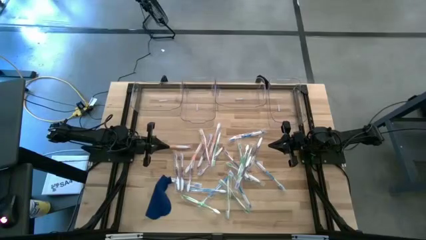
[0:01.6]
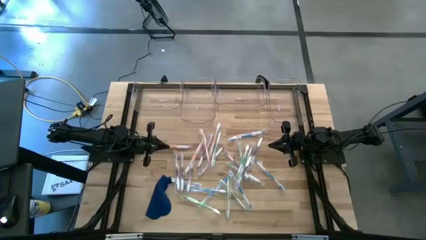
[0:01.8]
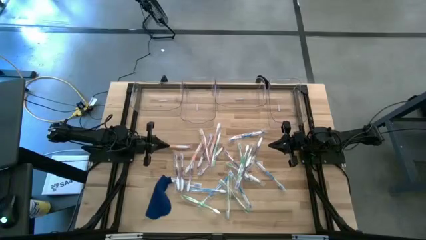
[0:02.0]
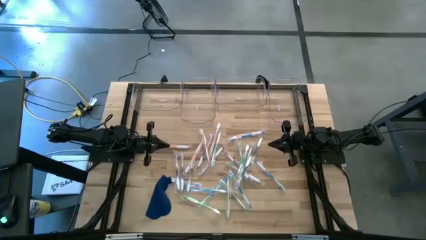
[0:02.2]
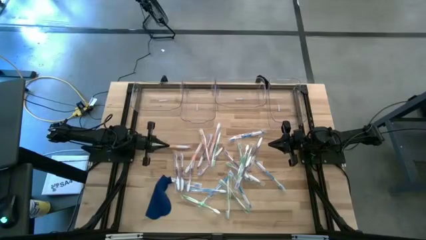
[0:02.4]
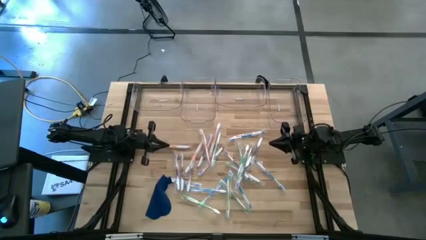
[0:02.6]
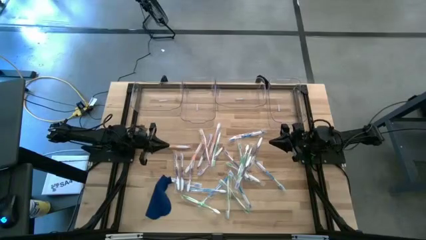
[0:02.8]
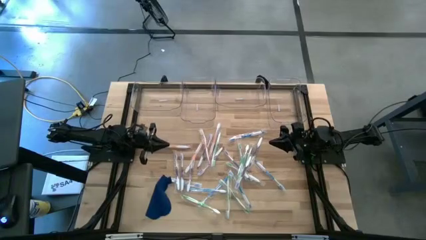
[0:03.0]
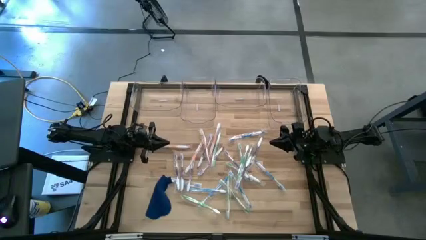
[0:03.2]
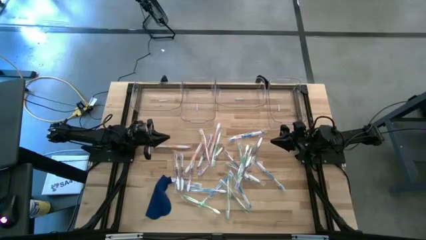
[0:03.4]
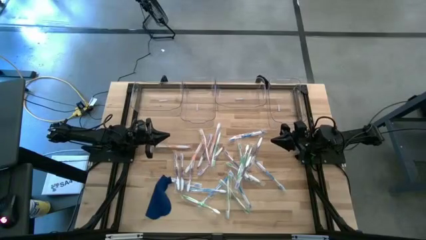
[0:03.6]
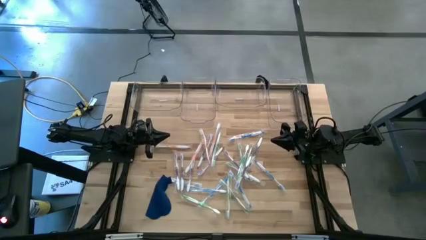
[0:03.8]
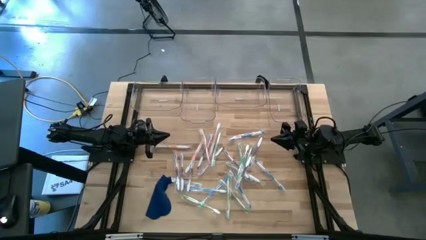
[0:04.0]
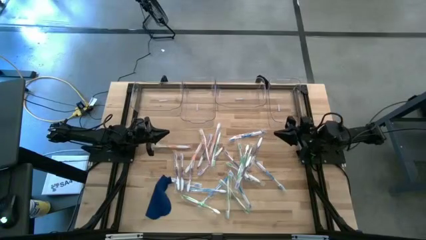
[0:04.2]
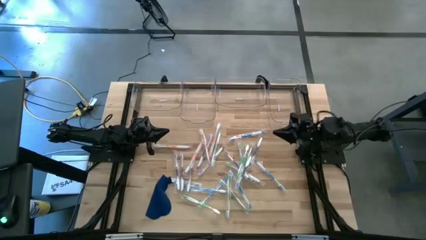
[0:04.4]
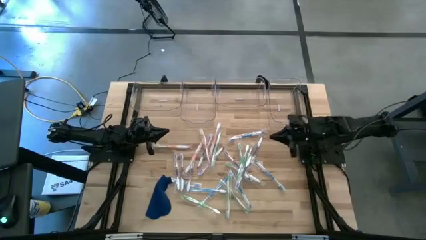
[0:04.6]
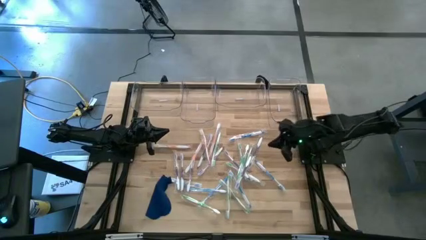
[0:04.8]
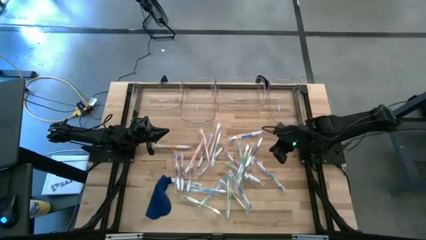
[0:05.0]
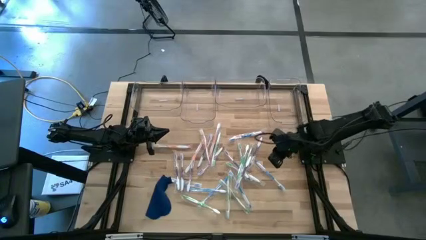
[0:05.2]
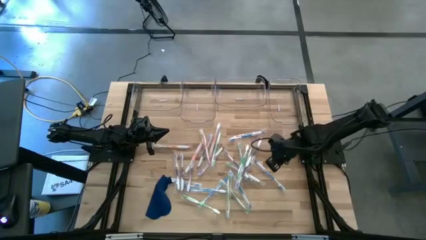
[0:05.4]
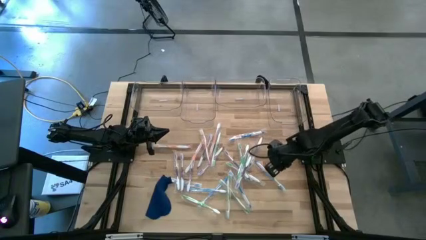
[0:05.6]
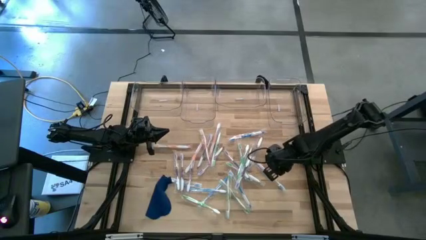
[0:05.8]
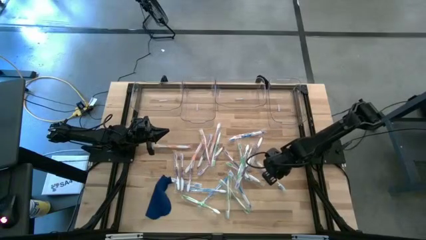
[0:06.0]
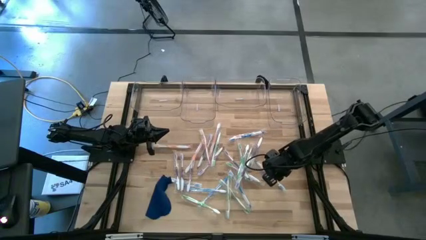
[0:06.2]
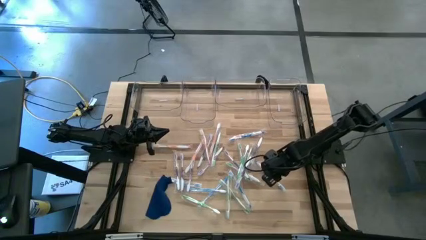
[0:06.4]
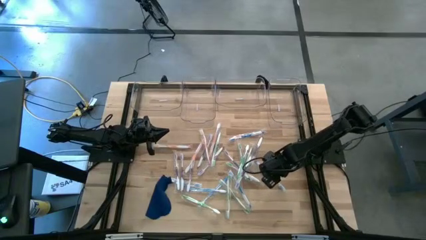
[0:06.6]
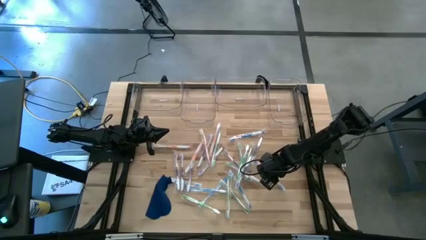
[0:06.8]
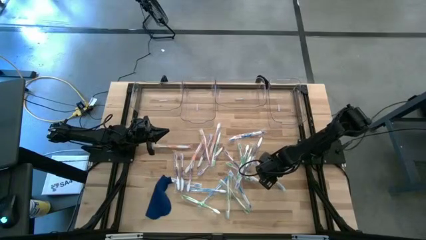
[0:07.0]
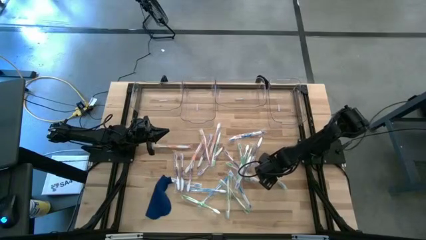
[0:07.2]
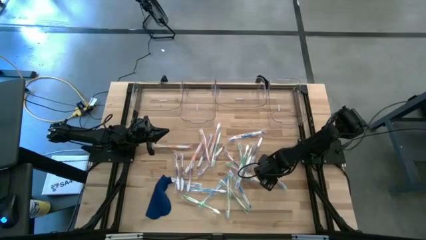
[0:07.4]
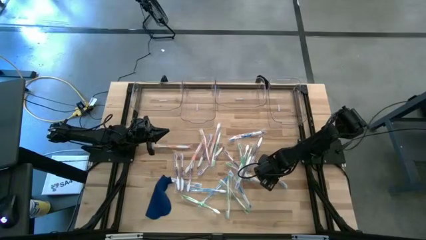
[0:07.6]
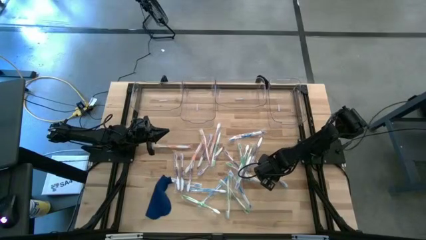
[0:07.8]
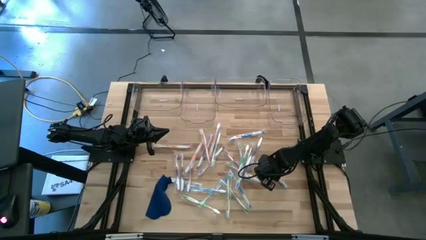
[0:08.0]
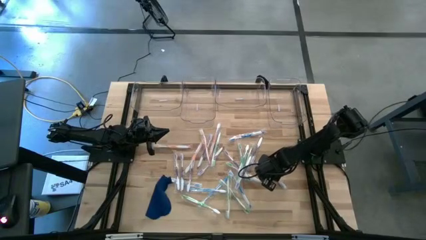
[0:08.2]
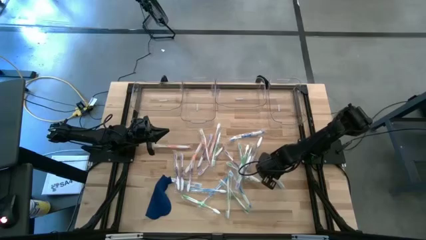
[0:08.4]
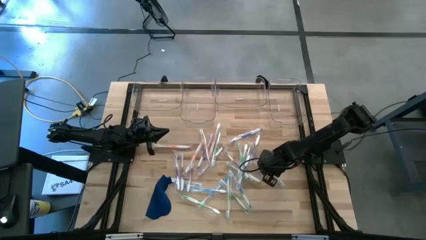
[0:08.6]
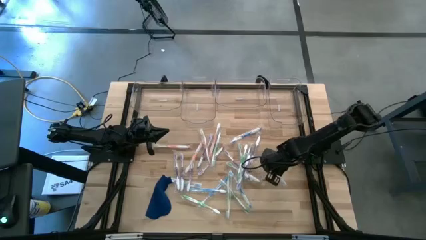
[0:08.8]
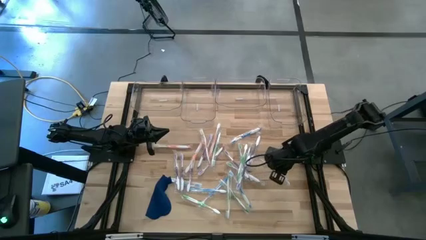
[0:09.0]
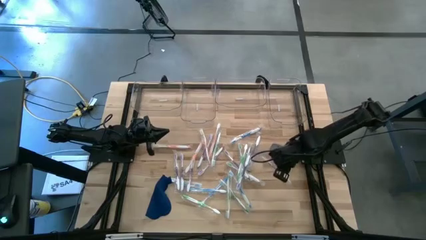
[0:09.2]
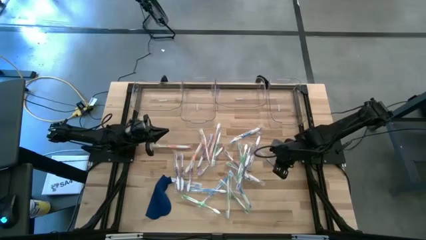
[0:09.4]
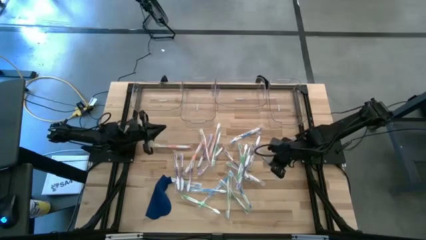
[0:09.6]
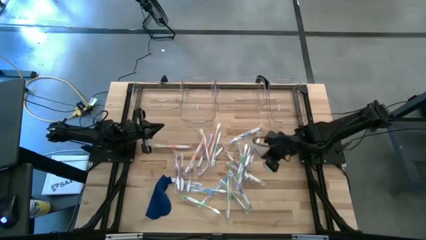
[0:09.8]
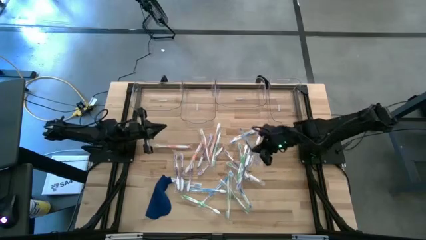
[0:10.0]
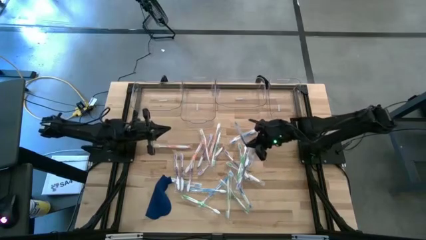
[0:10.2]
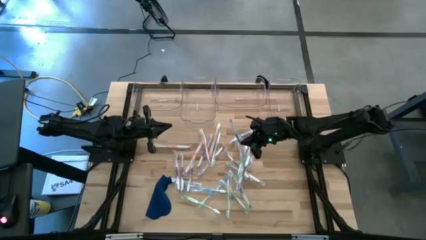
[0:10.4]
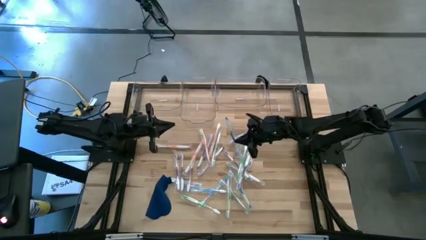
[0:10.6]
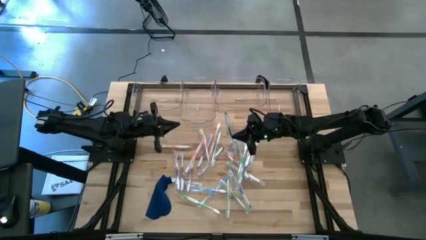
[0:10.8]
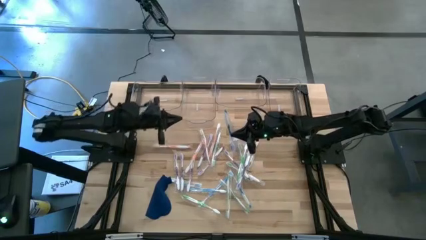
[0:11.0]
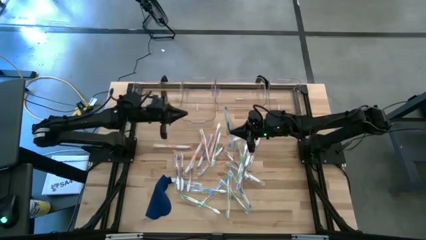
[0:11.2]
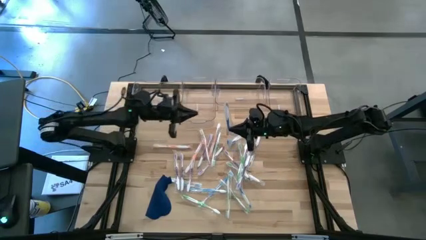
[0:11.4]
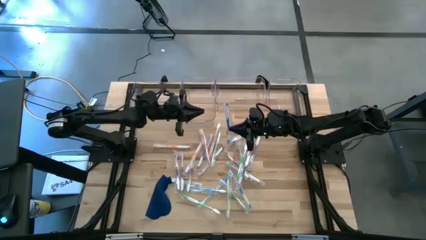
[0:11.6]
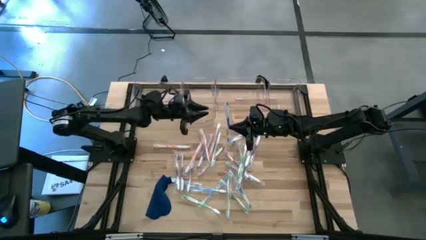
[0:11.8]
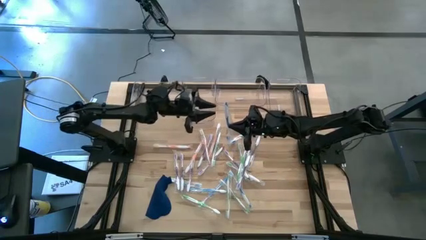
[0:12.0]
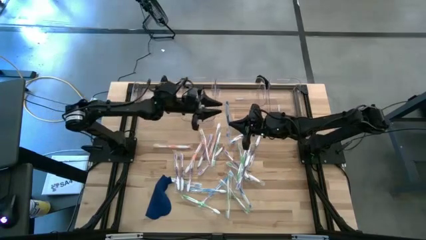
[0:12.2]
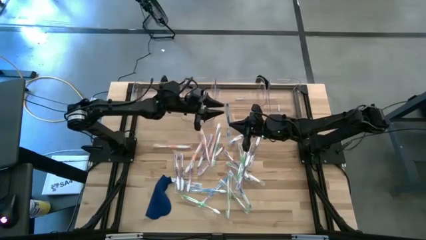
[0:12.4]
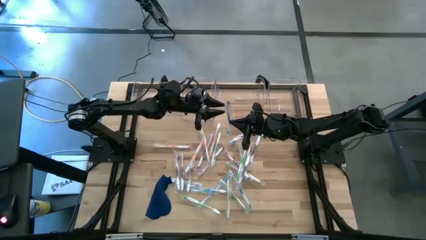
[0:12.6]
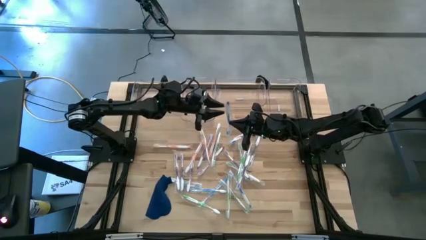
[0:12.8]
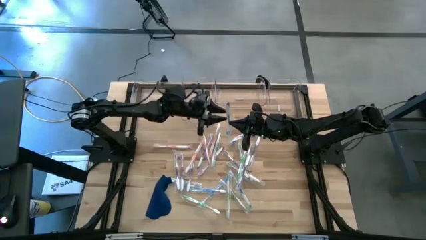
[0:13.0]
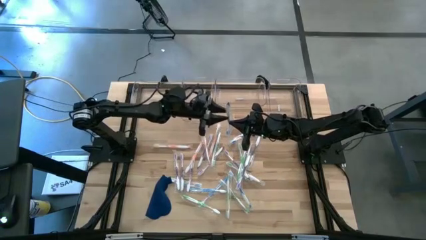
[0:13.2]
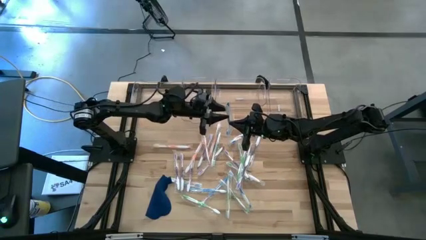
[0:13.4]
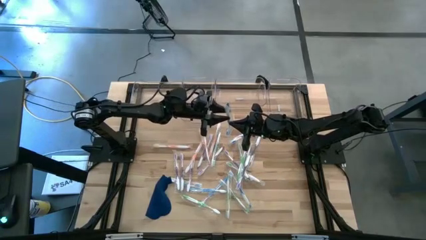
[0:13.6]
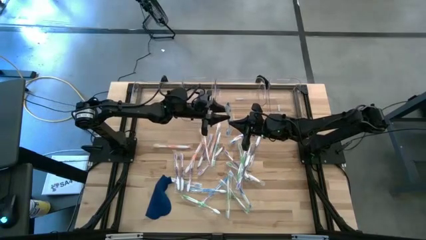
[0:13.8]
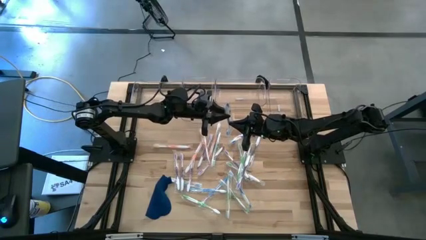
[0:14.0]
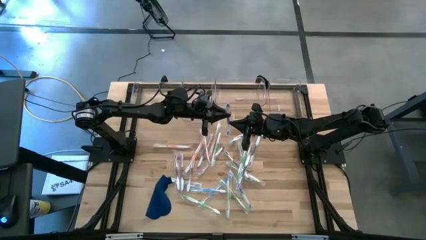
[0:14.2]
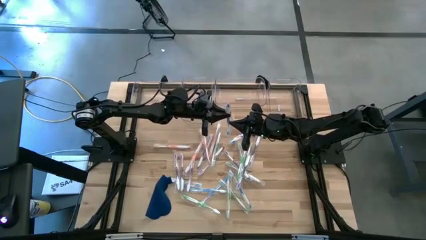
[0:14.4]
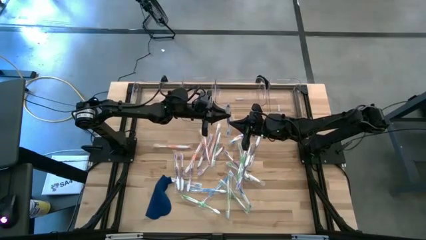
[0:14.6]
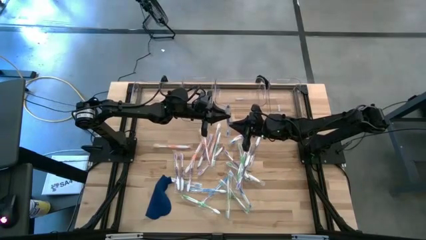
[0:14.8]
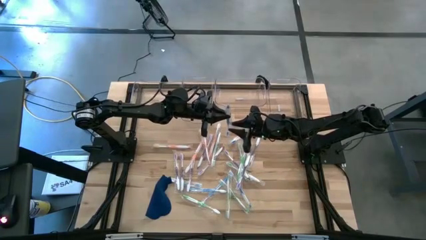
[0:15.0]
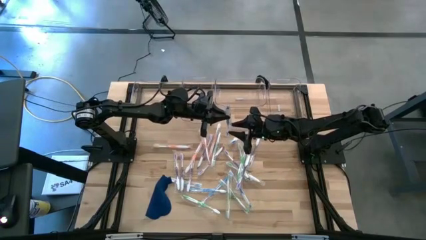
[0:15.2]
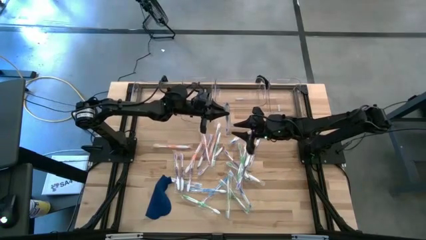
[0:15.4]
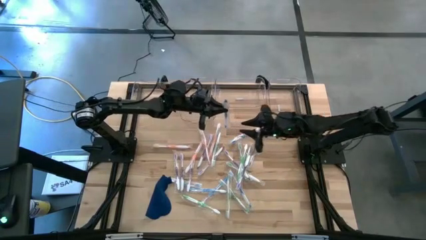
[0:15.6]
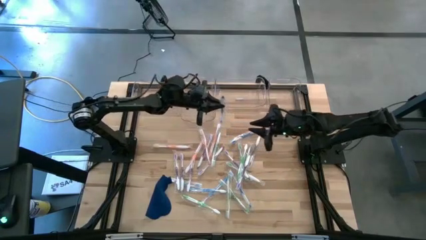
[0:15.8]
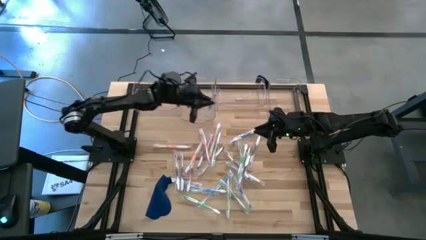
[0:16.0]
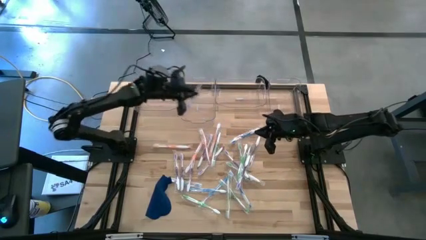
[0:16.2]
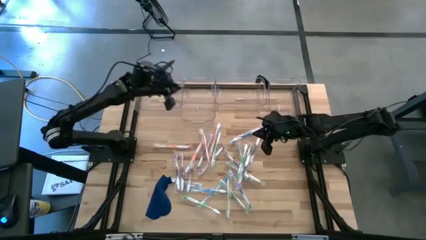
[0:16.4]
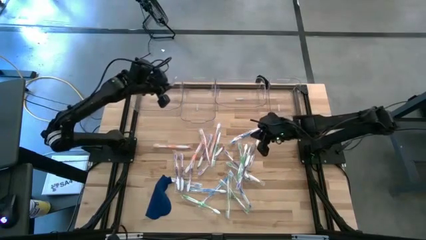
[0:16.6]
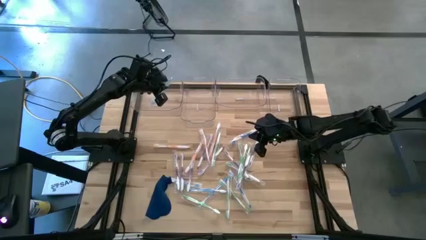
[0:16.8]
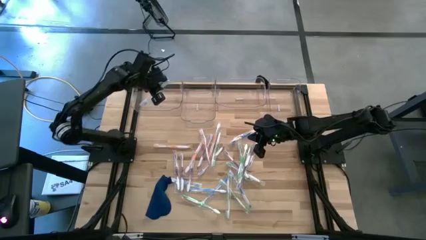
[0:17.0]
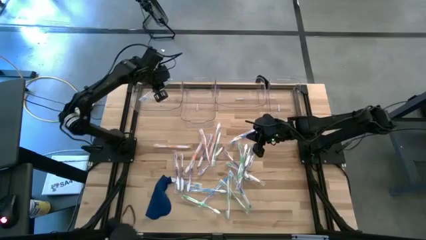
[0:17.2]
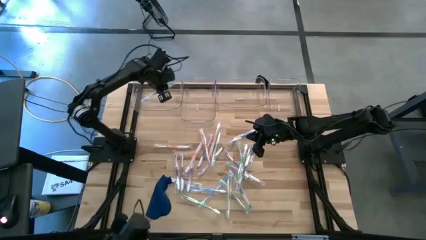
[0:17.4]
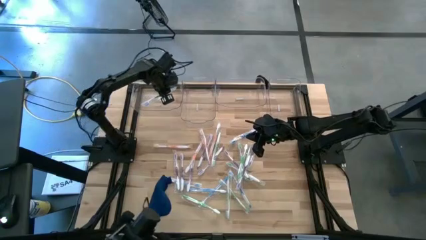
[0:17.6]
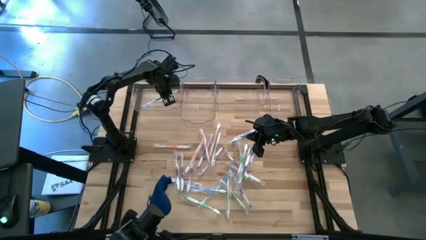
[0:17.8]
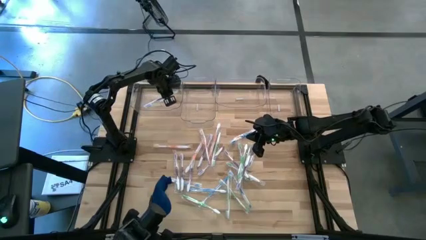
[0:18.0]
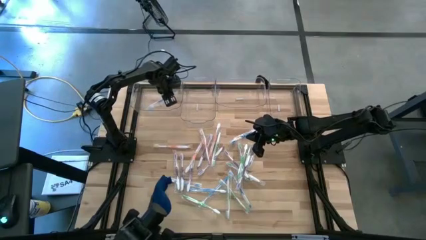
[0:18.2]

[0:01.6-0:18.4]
Task: Pick & Place Toothbrushes
Put the blue toothbrush into the left transparent bin
